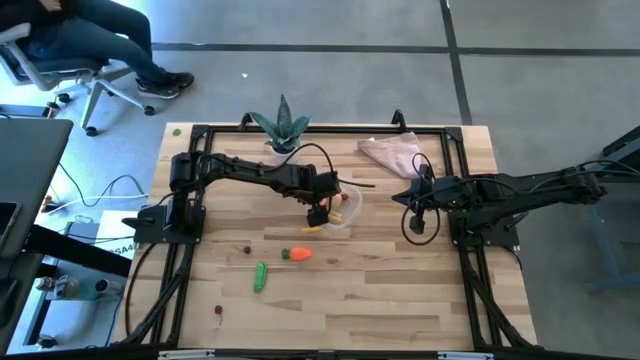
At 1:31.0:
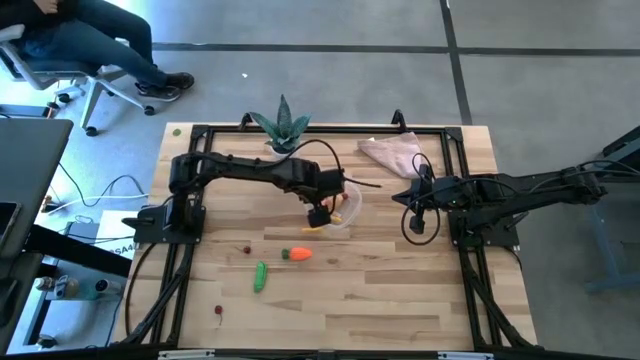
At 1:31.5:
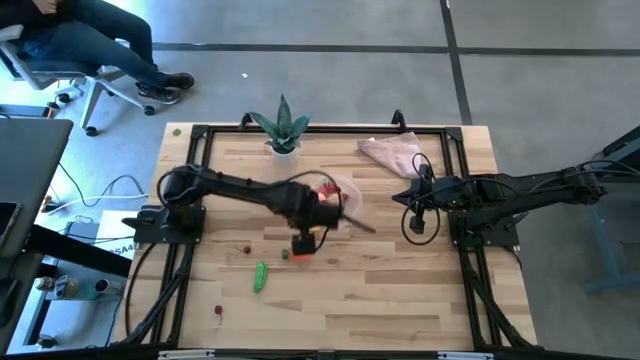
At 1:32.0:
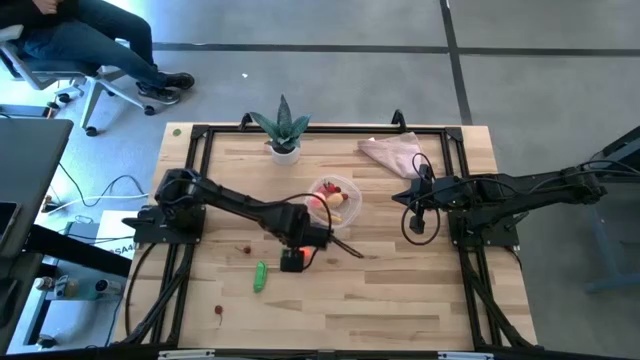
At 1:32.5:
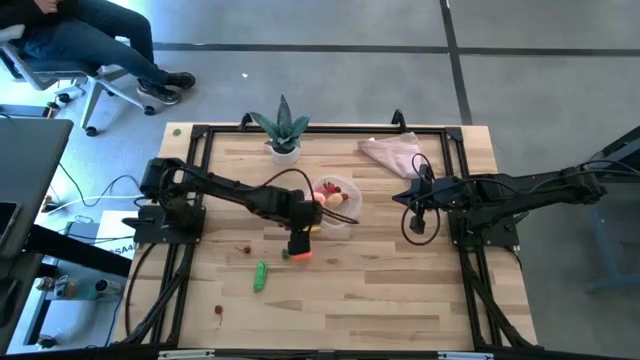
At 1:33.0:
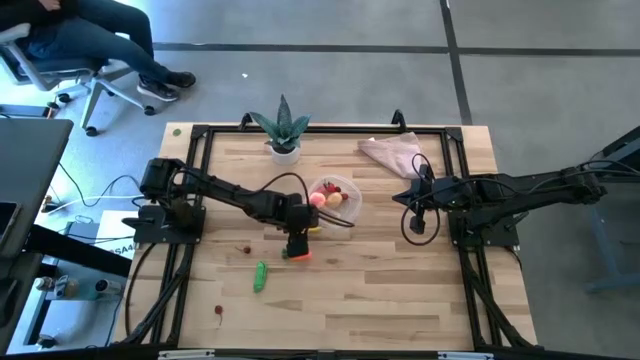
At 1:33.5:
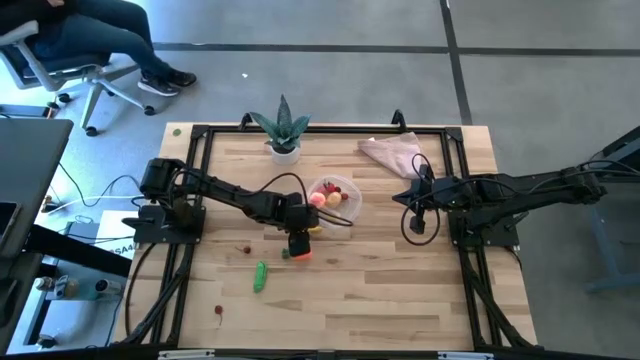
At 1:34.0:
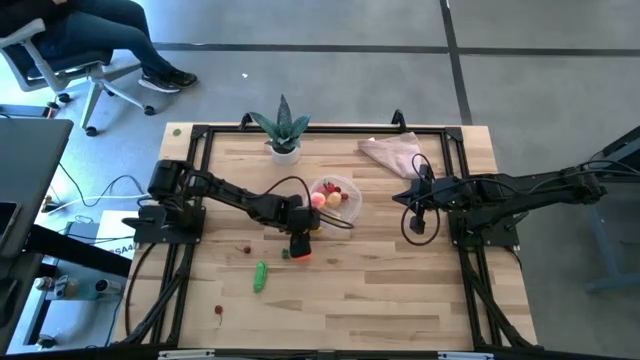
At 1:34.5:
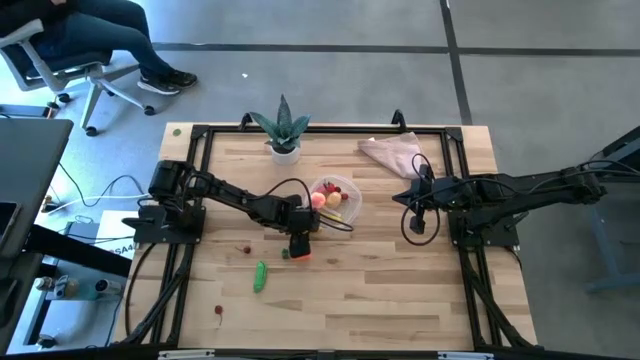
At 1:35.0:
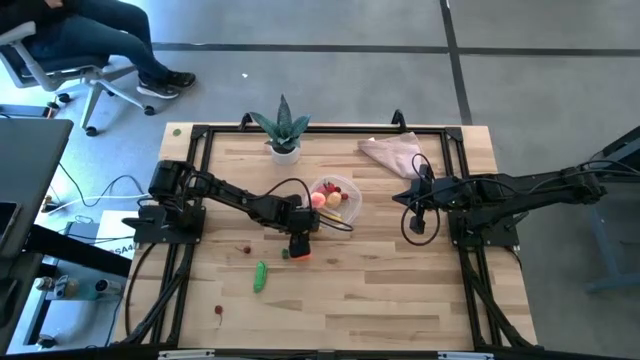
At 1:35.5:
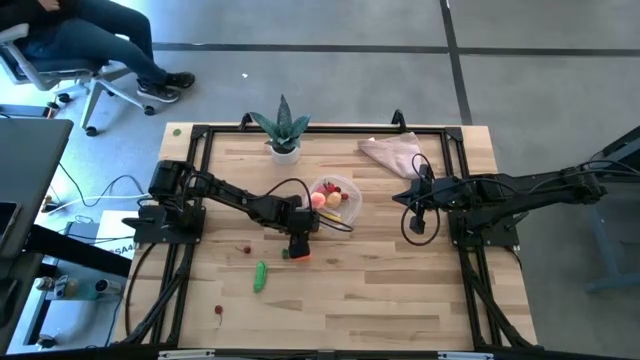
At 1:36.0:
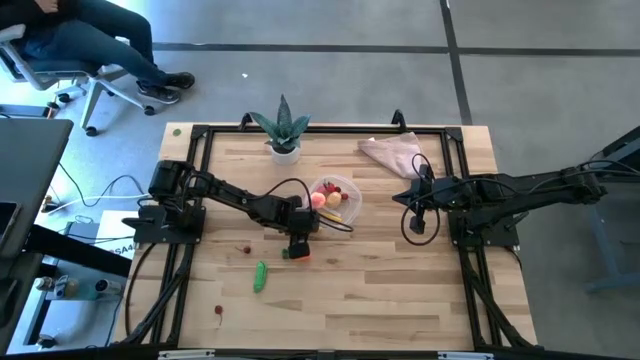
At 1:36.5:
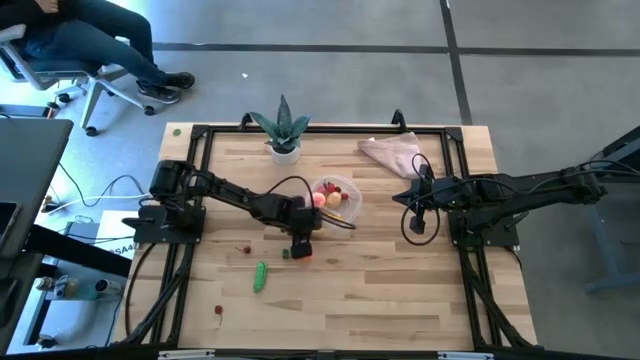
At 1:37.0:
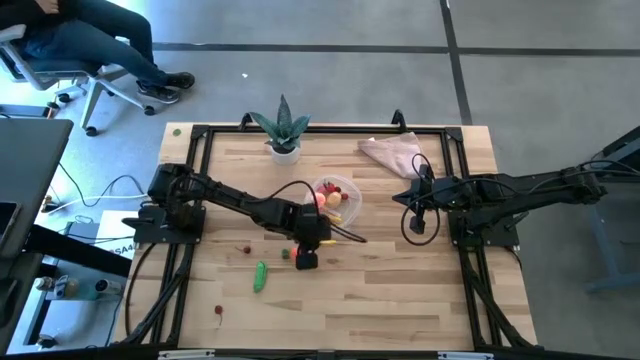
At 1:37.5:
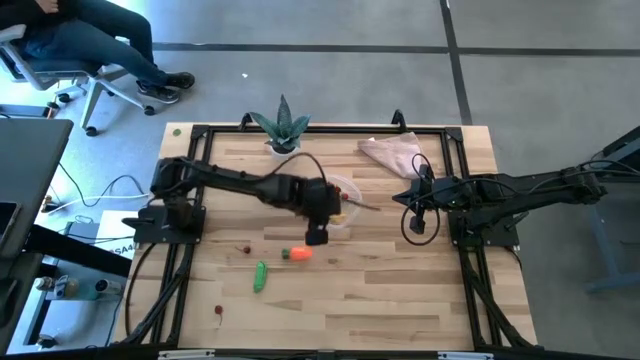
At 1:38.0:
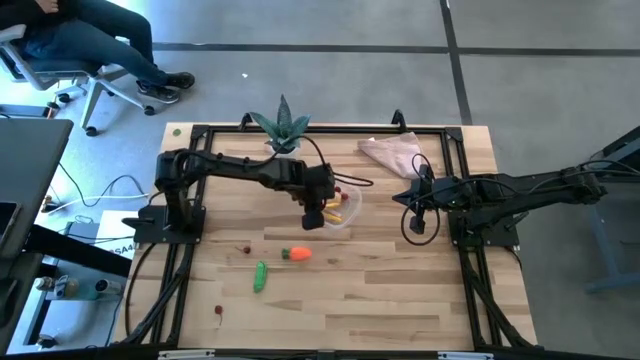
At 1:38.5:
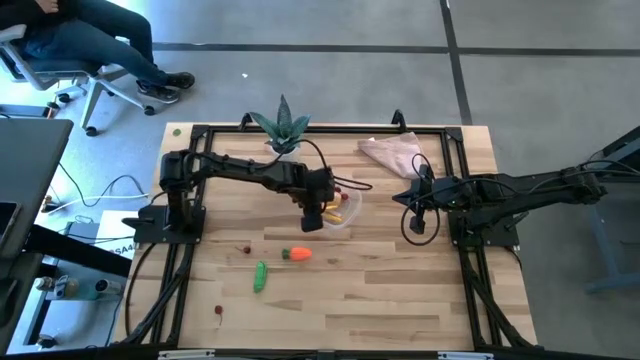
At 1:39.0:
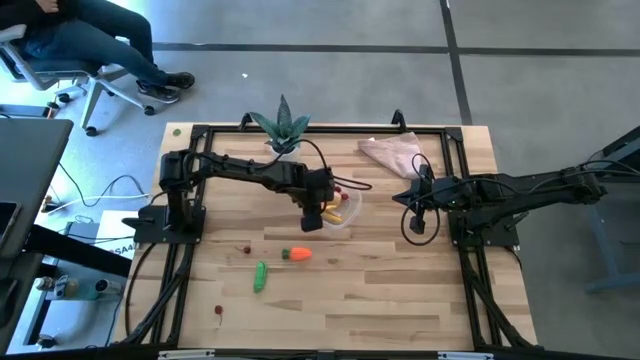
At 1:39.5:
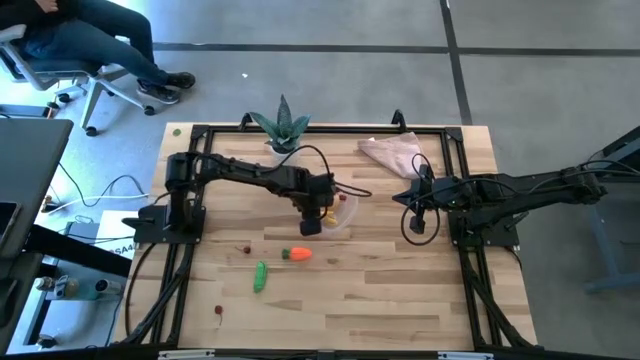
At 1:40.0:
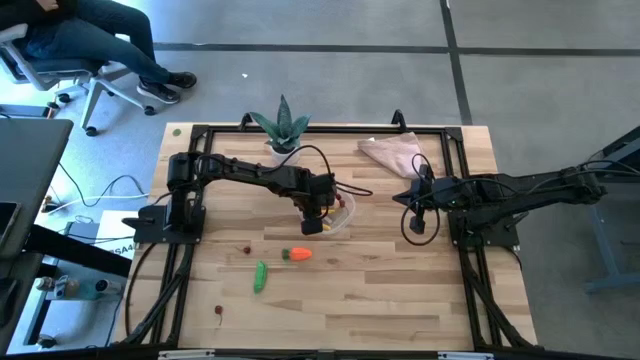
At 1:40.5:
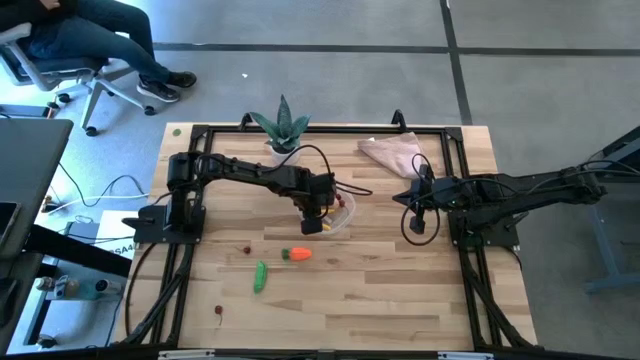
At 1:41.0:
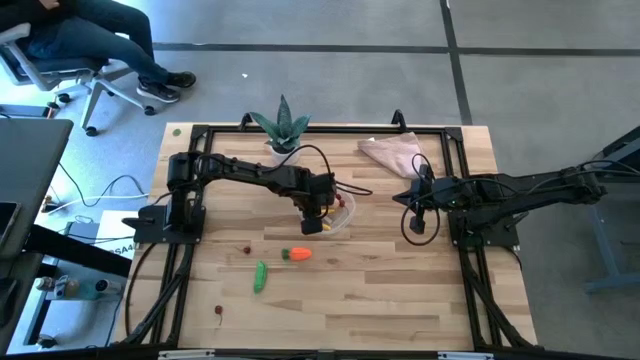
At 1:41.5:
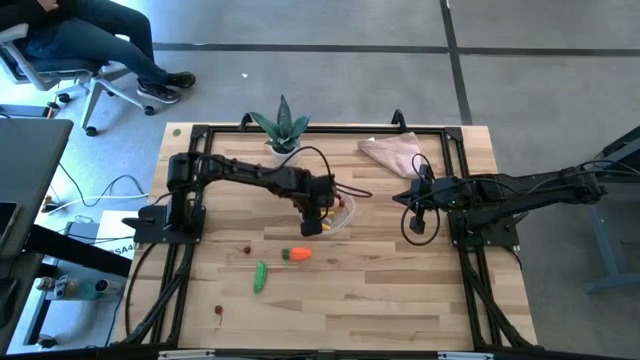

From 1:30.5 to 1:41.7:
Task: Pick and placing Produce into tupperware
Put the yellow corn into the transparent bin

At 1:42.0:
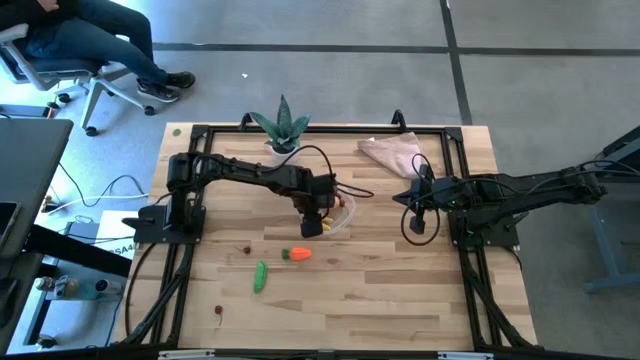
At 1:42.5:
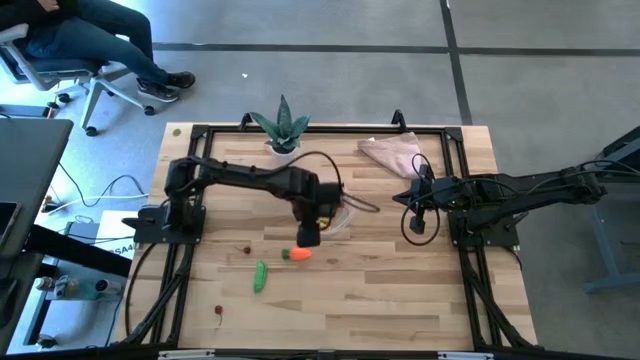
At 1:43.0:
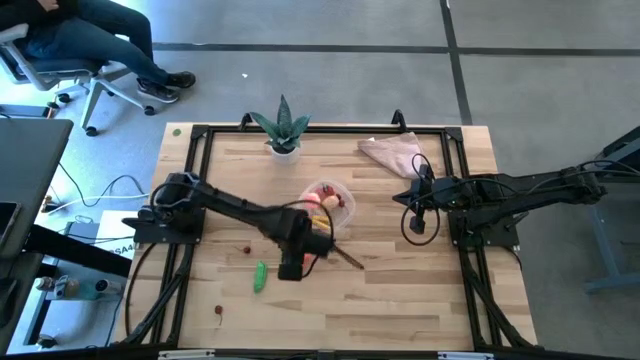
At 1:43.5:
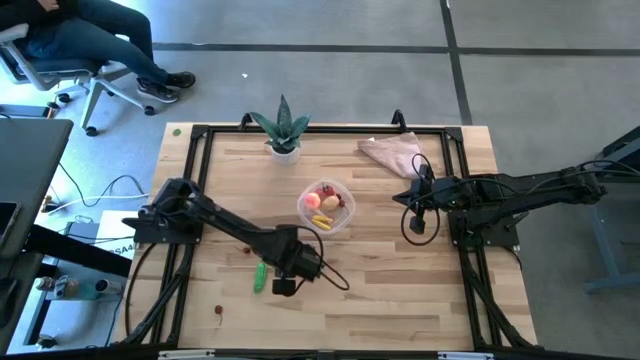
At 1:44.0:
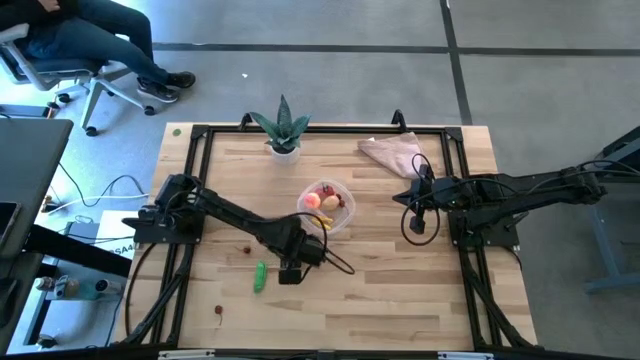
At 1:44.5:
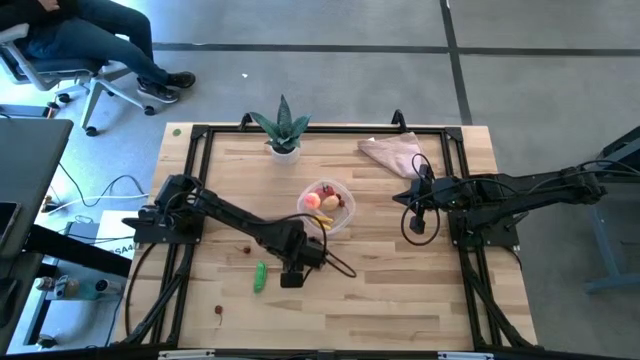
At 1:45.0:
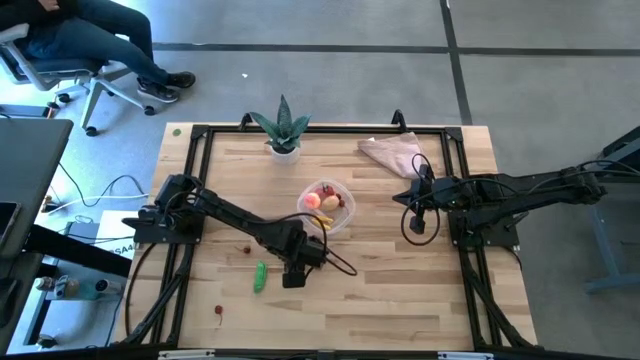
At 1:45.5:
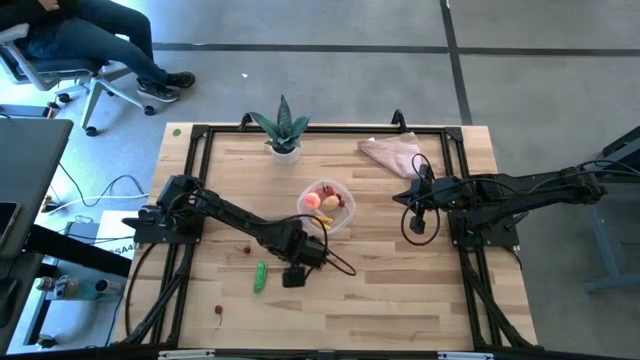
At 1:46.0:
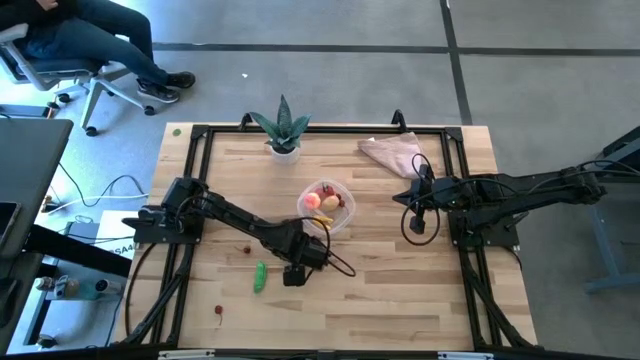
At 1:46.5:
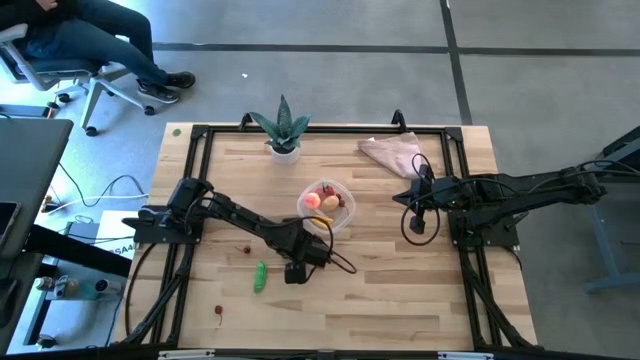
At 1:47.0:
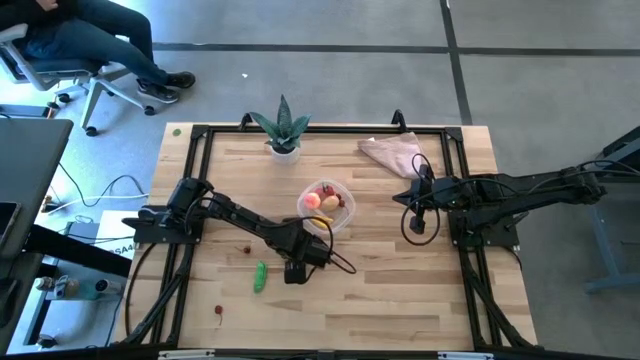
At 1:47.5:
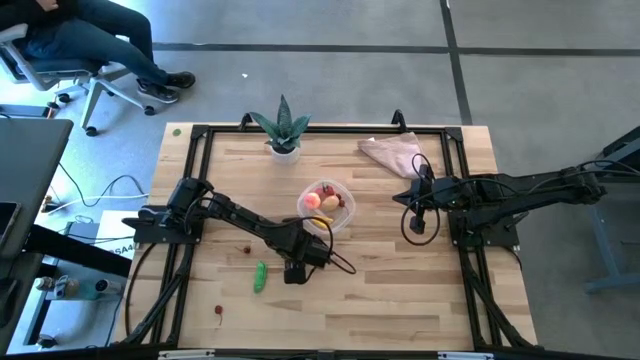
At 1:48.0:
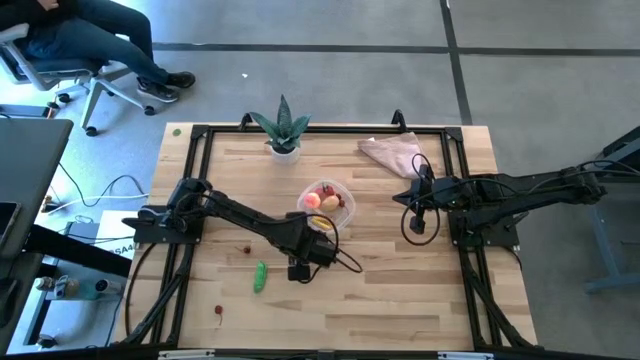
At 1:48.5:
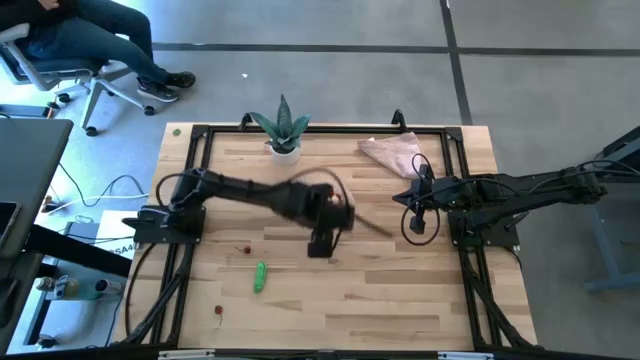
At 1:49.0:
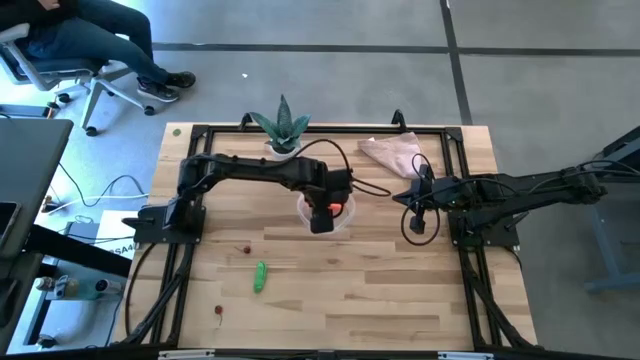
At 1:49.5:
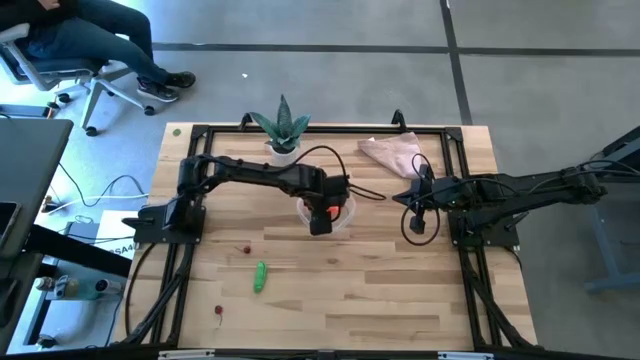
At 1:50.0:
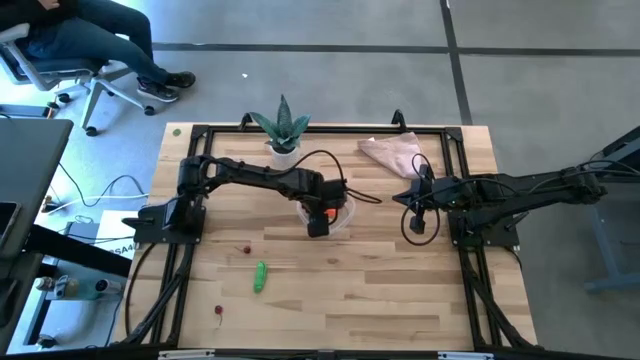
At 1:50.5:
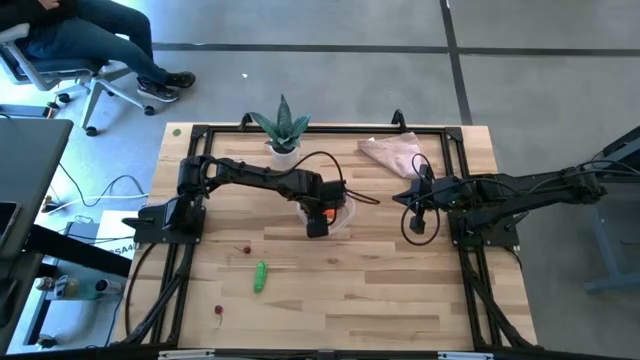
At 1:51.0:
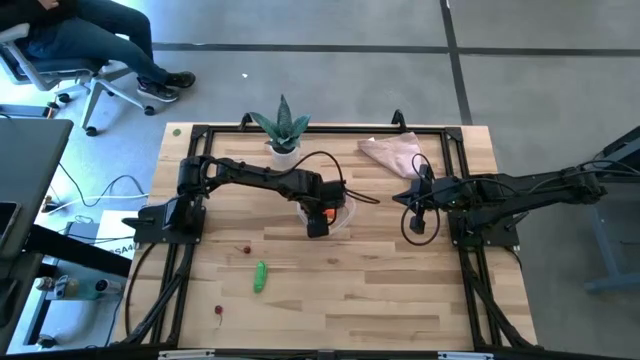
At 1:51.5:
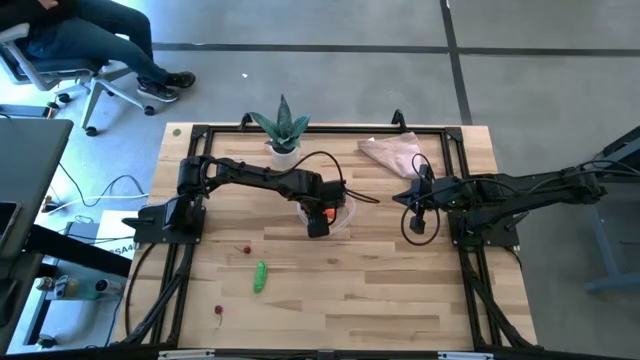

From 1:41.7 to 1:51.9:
Put the orange carrot into the transparent bin
